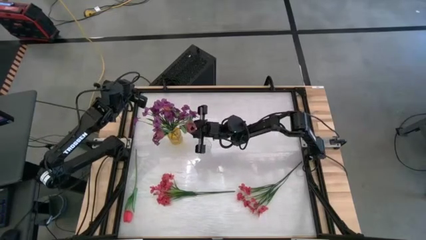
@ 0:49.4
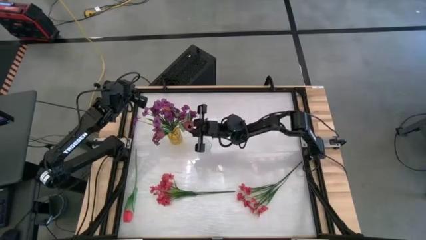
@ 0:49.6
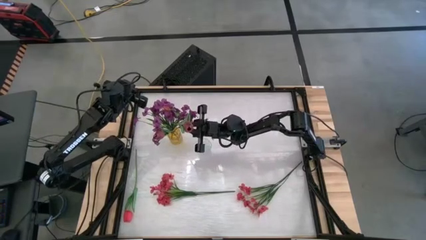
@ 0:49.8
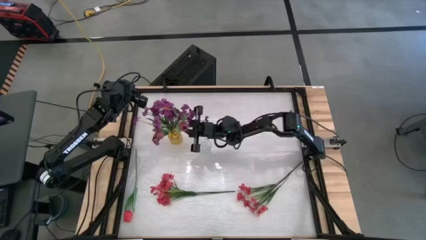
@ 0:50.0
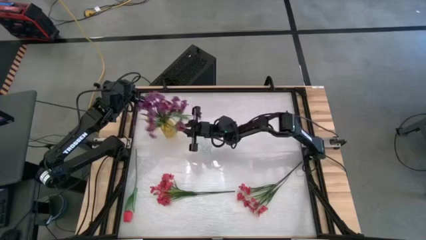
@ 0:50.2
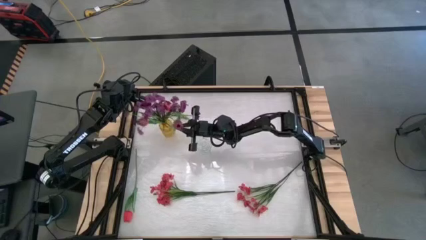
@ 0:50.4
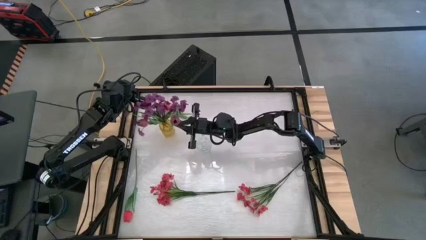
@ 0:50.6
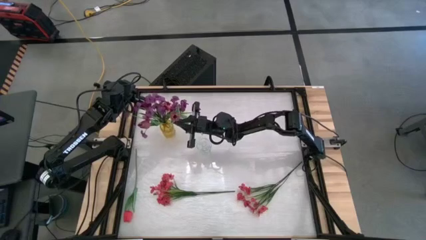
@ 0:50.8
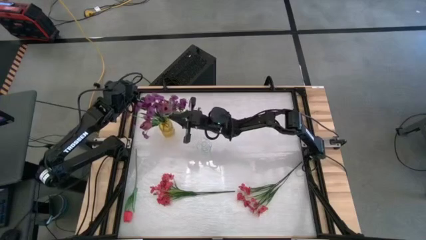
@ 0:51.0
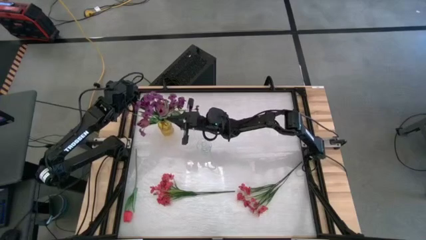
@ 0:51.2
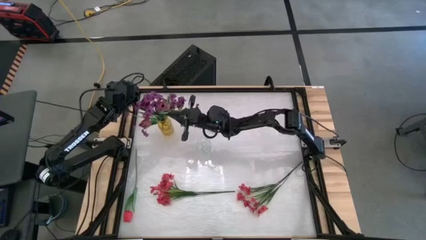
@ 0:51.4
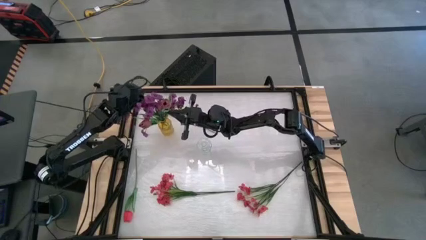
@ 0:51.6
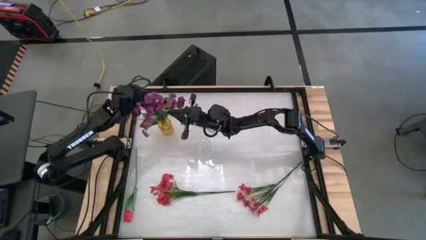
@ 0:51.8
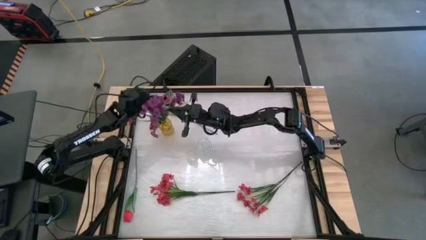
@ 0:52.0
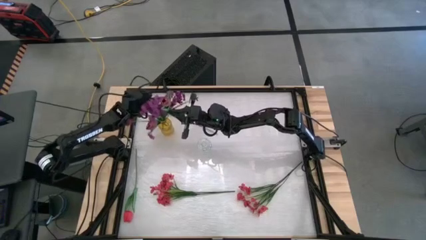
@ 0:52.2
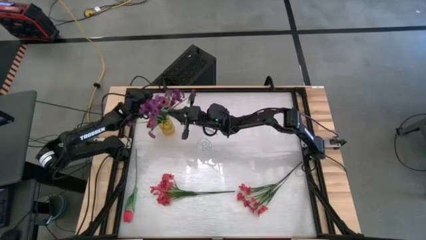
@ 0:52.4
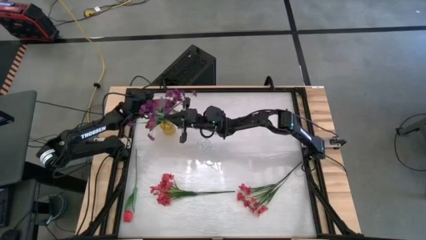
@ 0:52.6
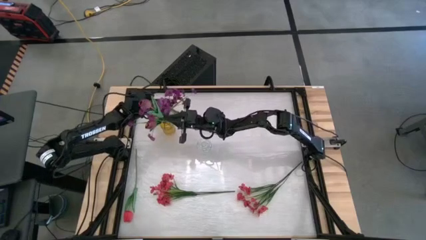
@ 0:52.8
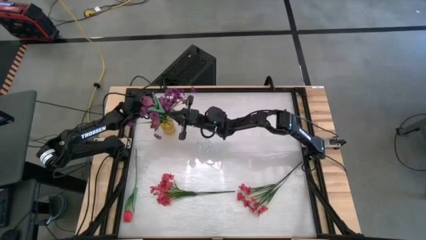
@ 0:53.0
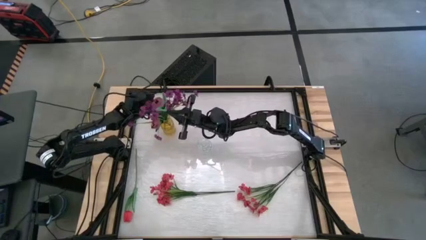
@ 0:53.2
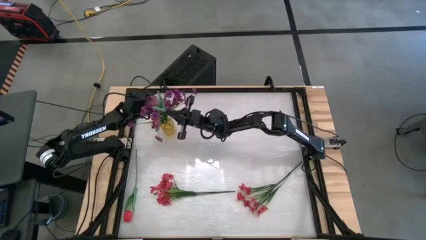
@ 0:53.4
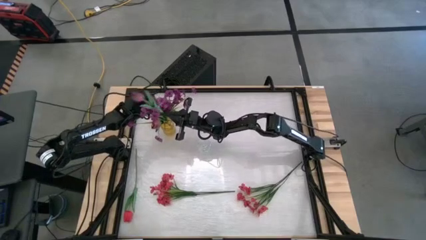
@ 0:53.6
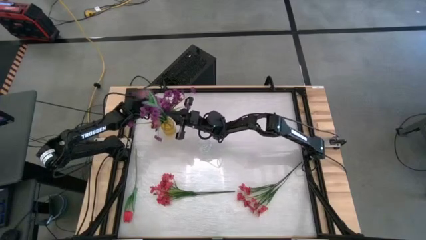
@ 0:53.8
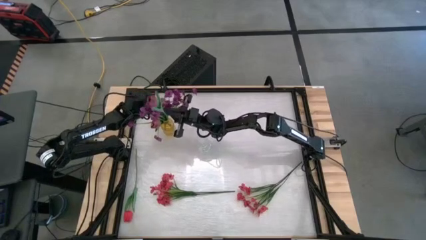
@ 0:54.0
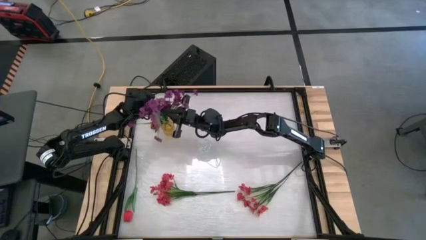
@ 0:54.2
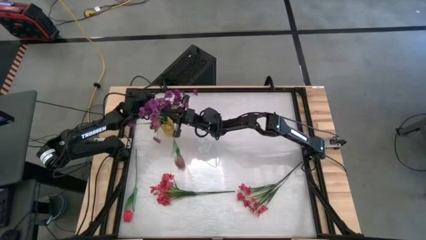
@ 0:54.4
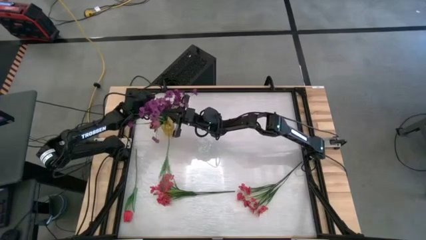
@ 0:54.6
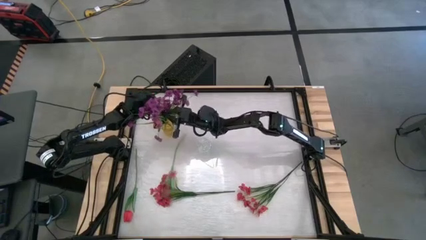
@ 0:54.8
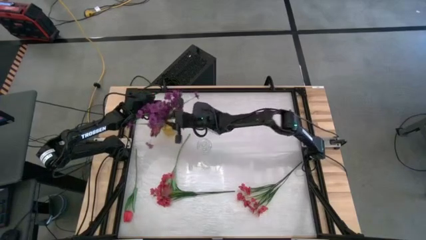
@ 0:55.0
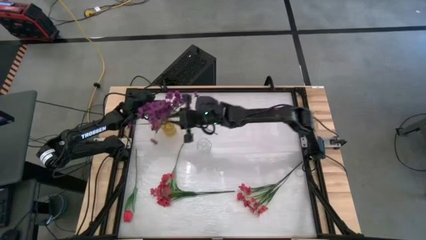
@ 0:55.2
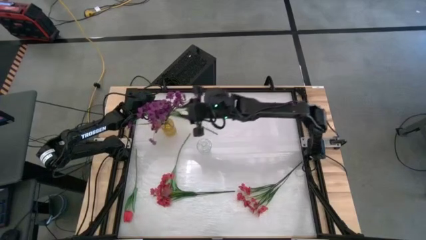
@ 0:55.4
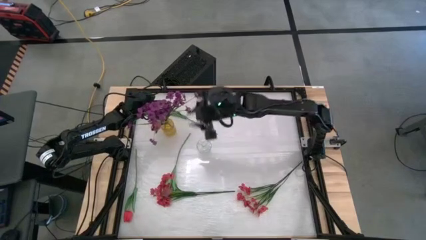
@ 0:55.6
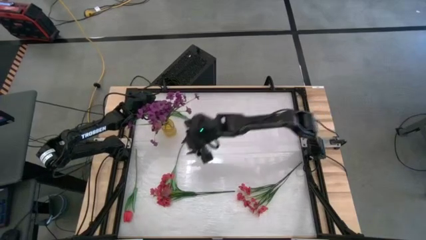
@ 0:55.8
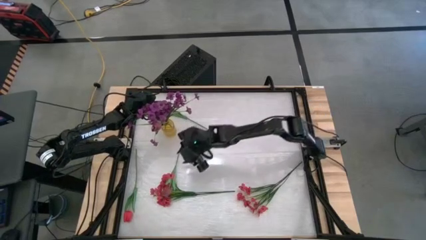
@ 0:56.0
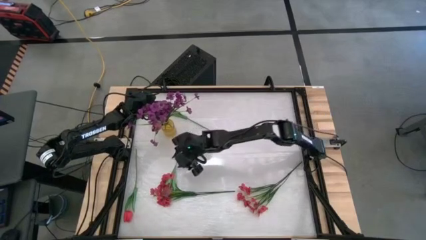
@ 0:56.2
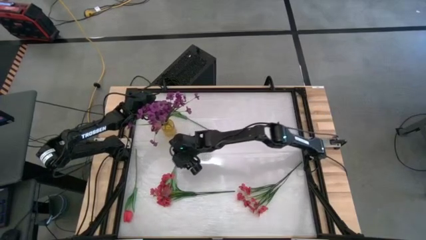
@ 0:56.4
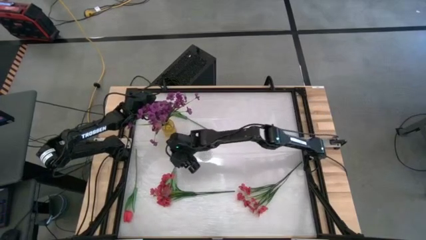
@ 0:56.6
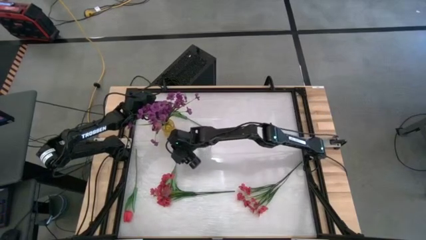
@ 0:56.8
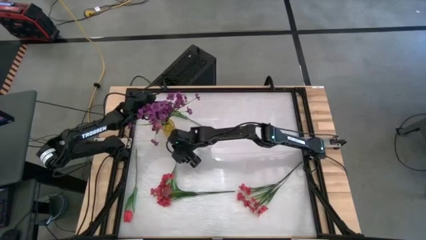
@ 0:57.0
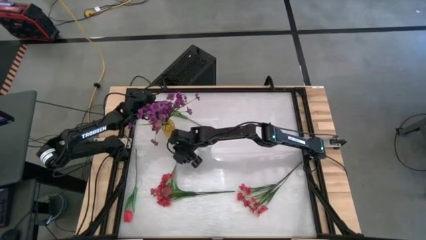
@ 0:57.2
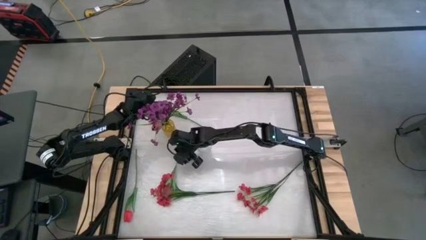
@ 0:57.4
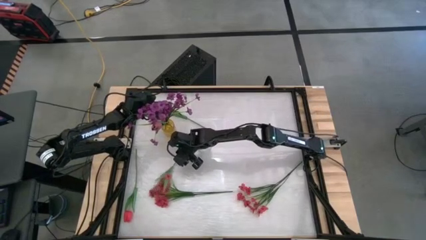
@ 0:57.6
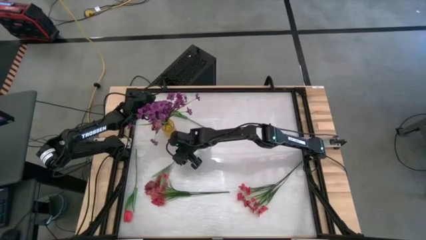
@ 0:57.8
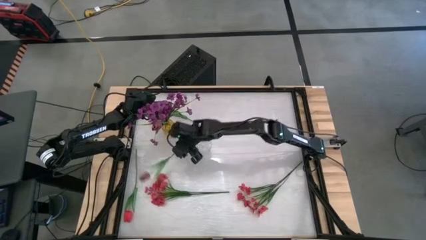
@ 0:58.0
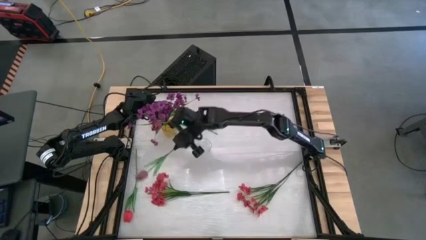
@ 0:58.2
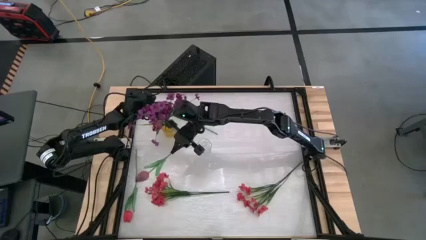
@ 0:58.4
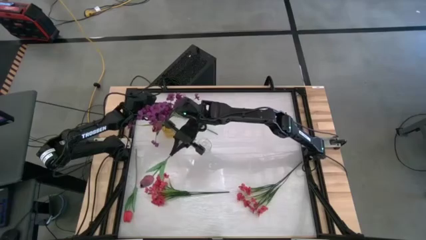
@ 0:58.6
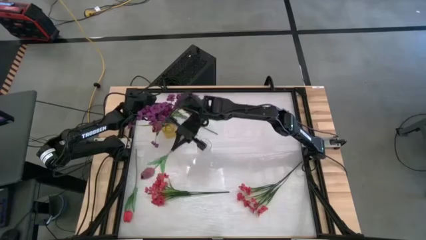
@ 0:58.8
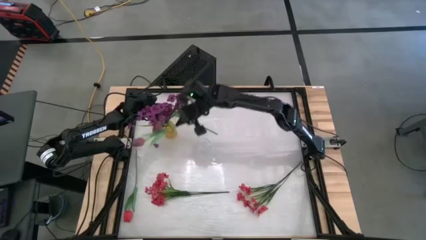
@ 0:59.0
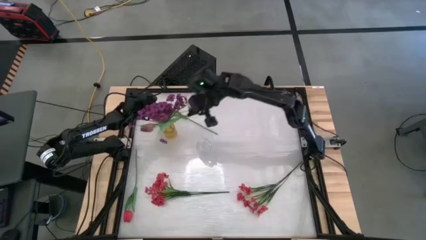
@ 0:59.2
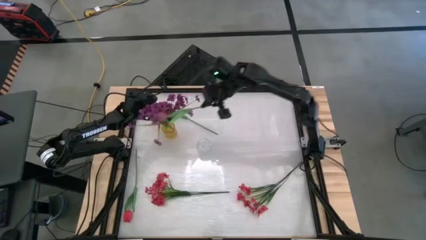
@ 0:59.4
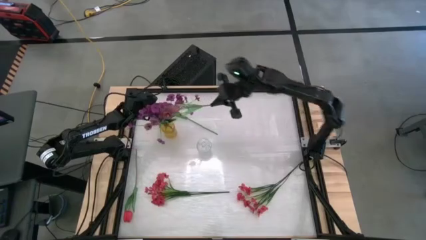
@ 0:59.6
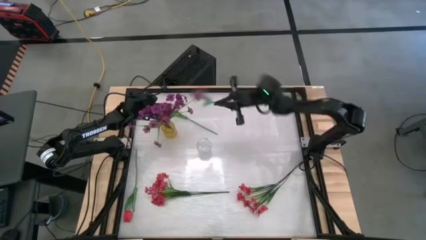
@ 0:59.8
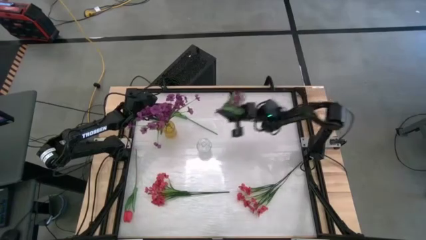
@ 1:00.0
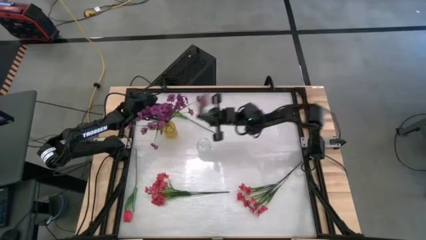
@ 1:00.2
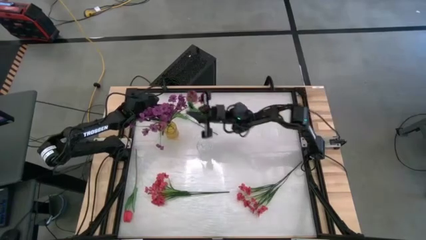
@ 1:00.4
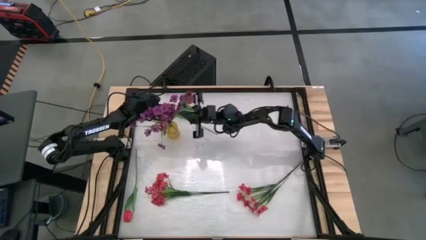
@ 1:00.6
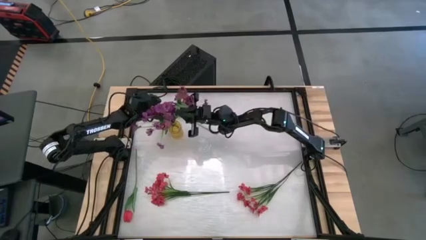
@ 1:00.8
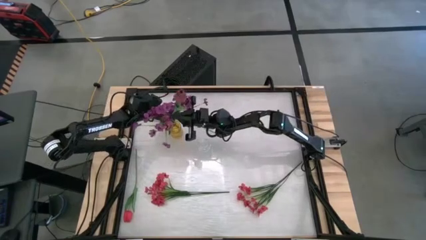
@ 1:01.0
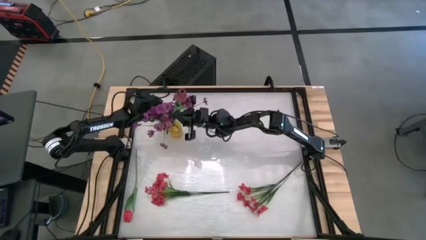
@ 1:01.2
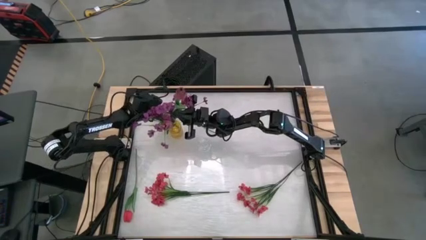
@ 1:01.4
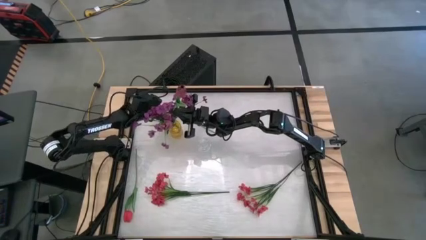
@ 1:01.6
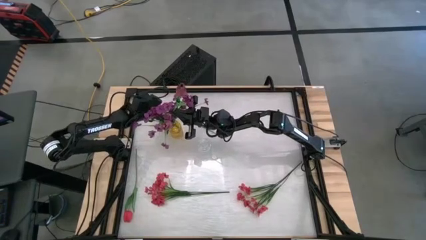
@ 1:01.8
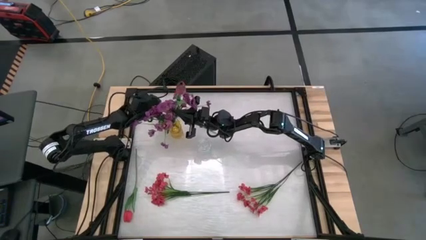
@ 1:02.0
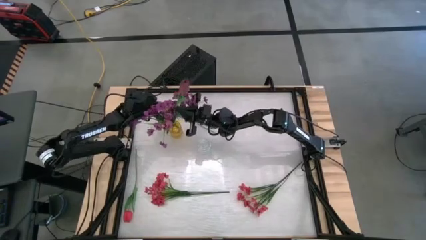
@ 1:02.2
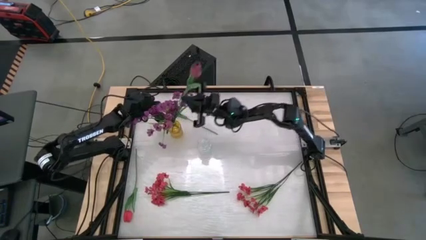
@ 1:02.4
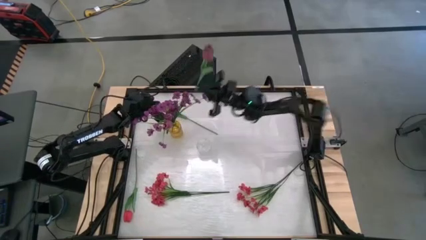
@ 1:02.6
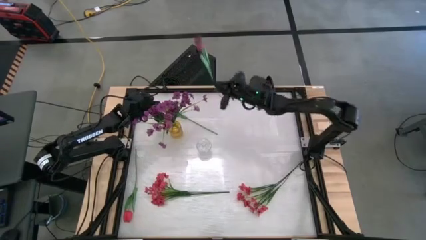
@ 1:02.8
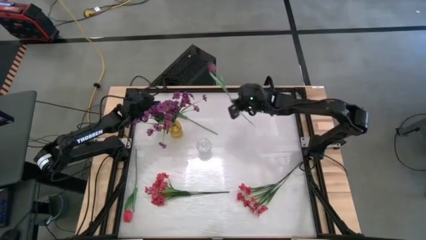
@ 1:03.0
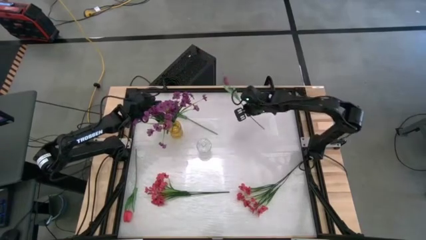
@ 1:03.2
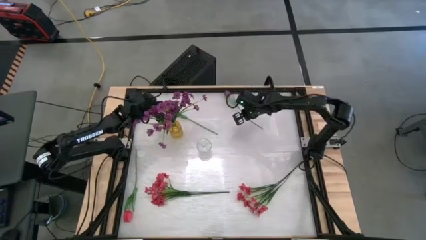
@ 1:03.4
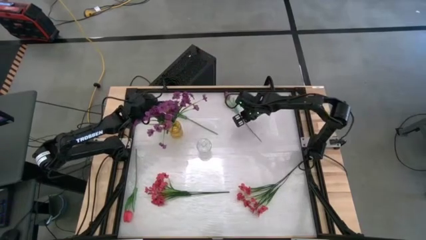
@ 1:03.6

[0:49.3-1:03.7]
Task: Sort flowers into vase by color
Put the red flower into the yellow vase
